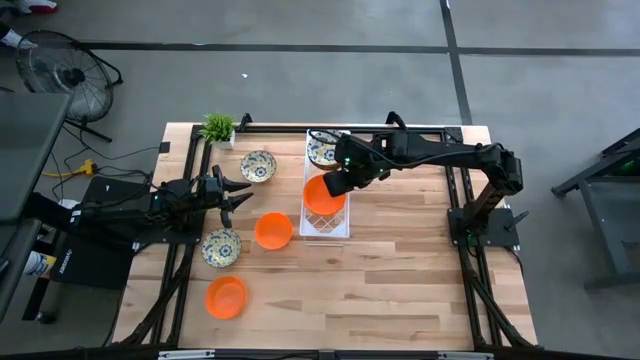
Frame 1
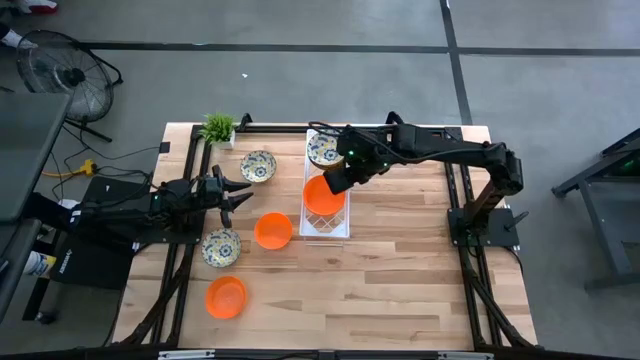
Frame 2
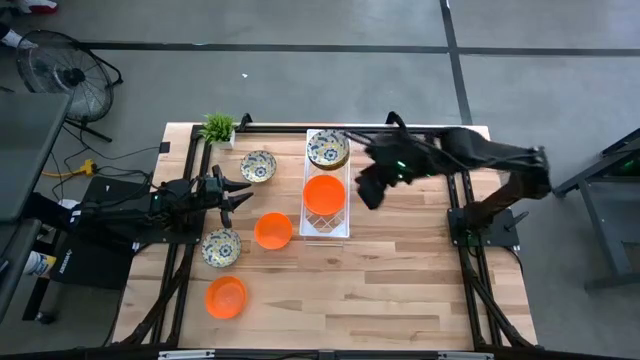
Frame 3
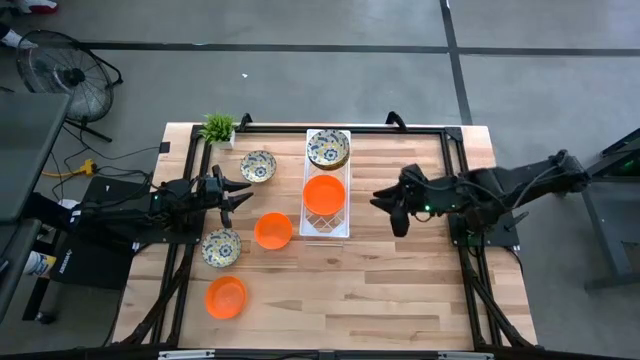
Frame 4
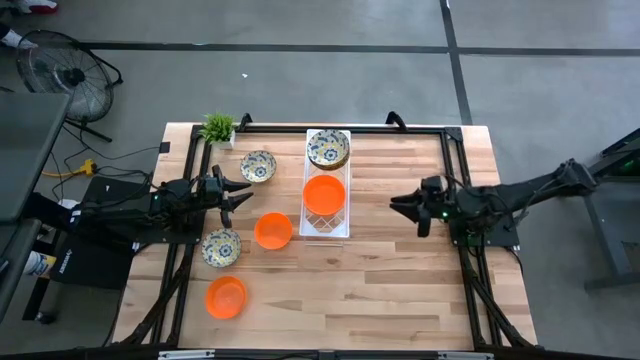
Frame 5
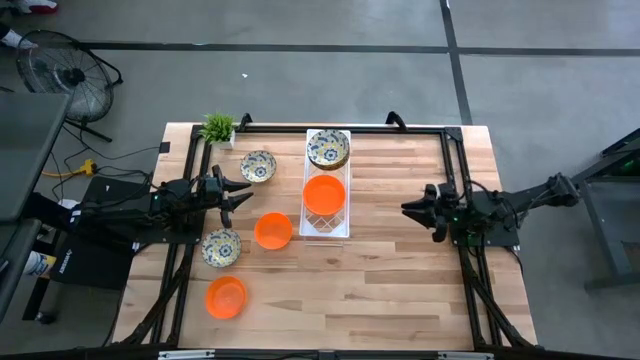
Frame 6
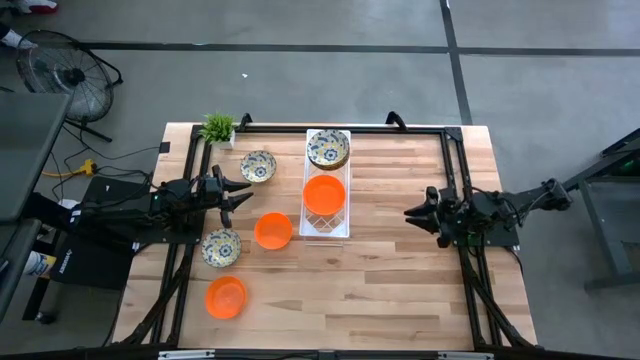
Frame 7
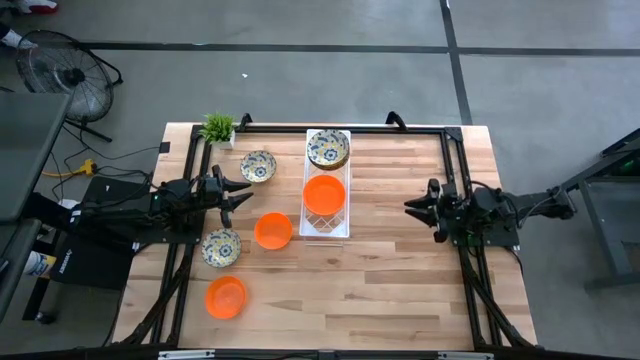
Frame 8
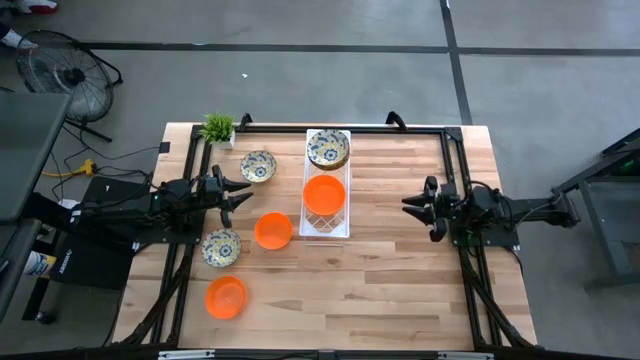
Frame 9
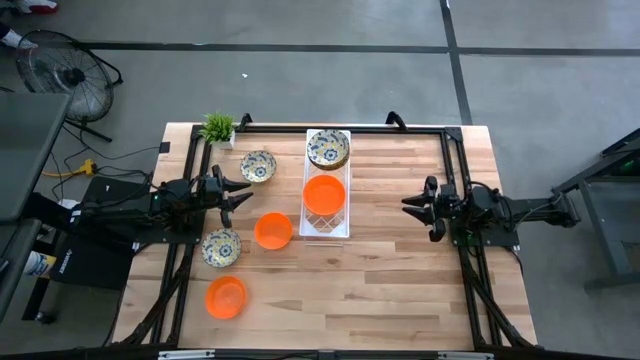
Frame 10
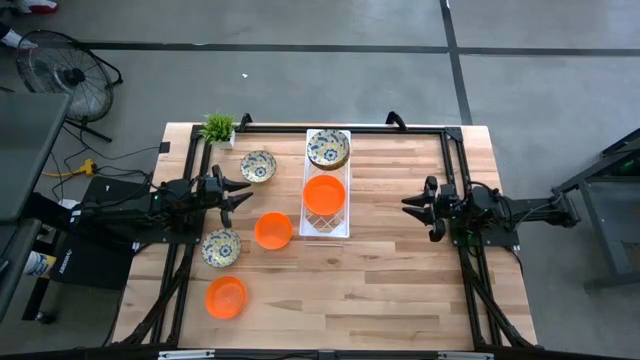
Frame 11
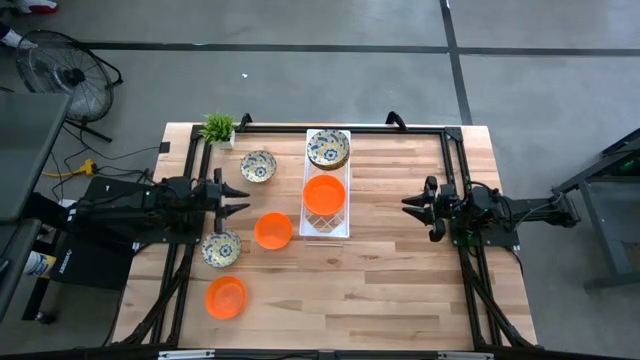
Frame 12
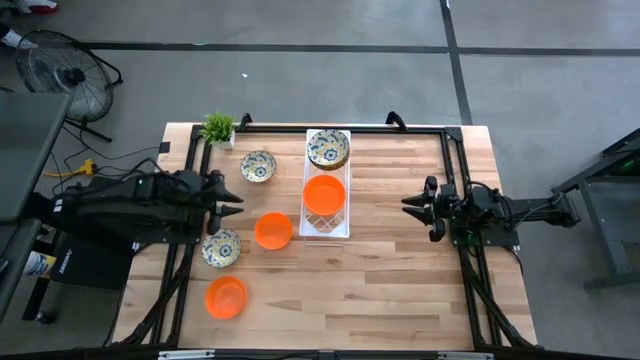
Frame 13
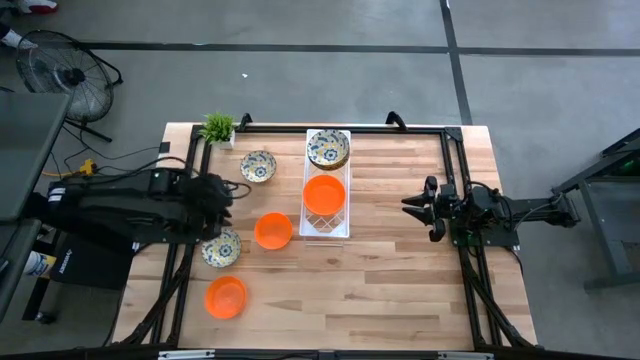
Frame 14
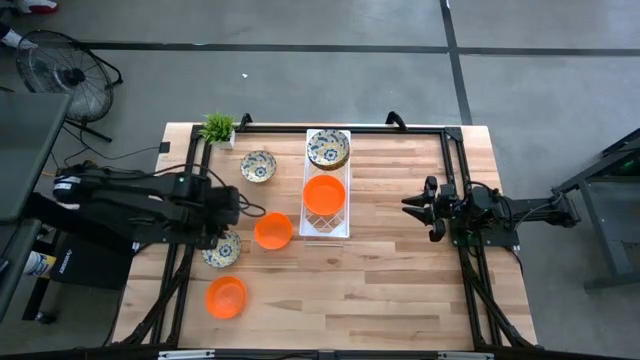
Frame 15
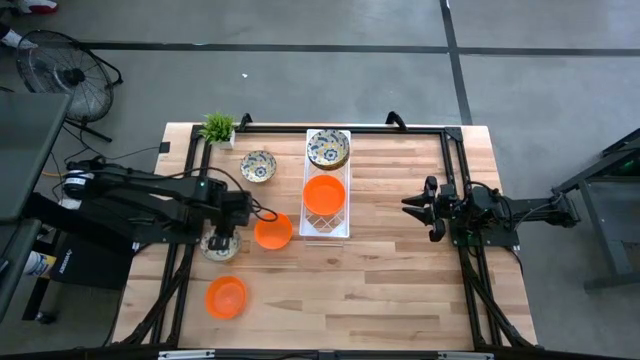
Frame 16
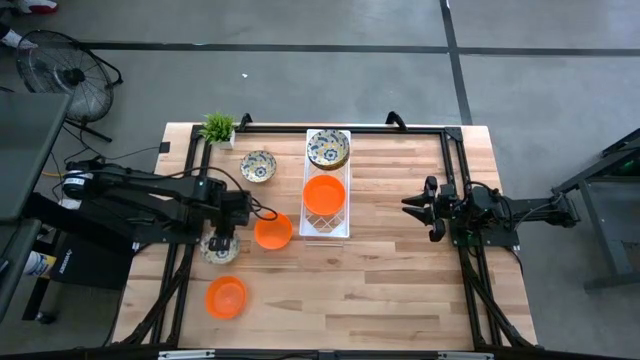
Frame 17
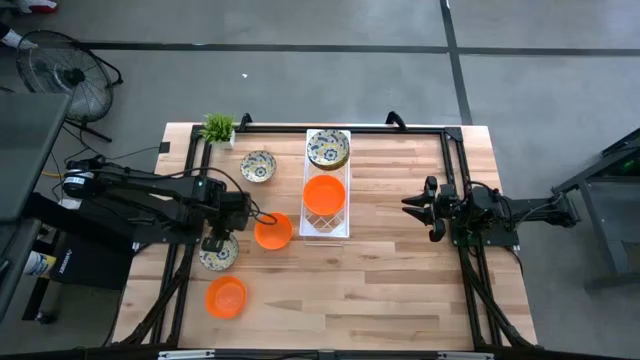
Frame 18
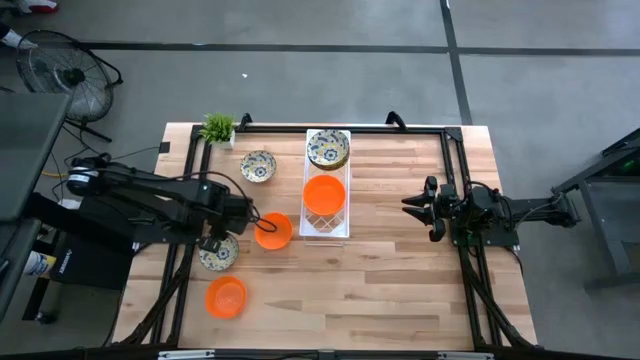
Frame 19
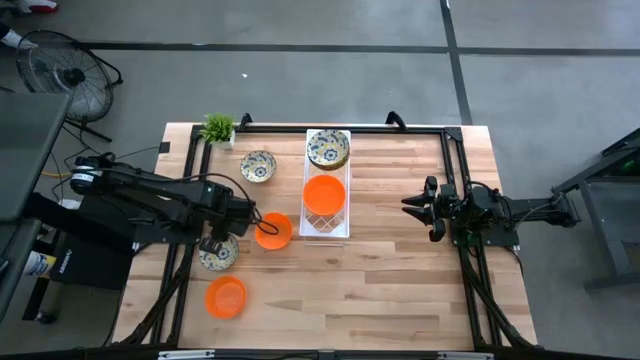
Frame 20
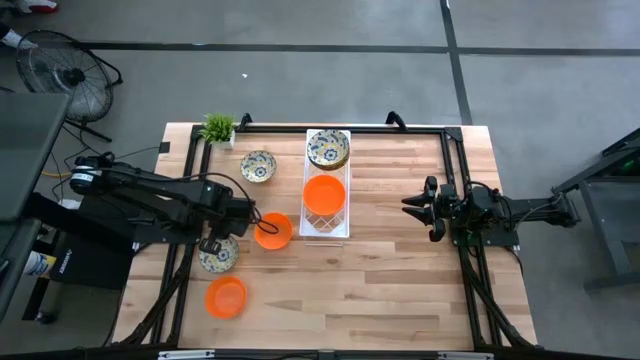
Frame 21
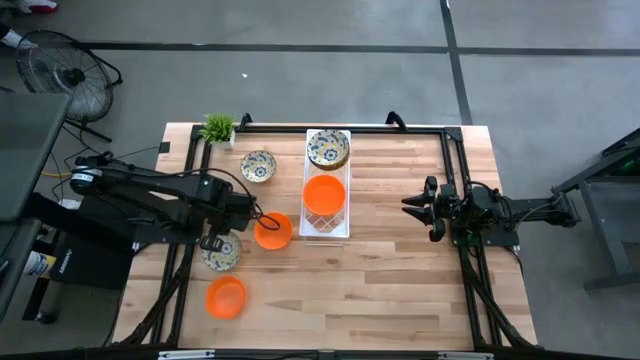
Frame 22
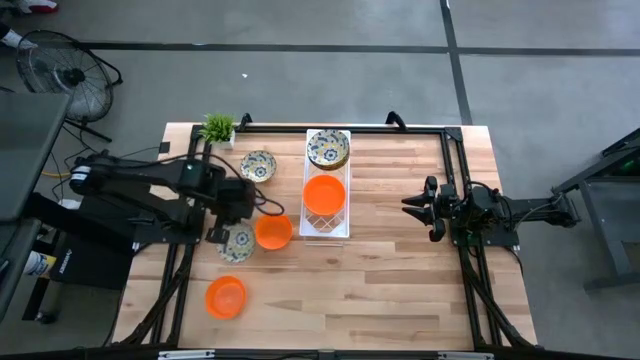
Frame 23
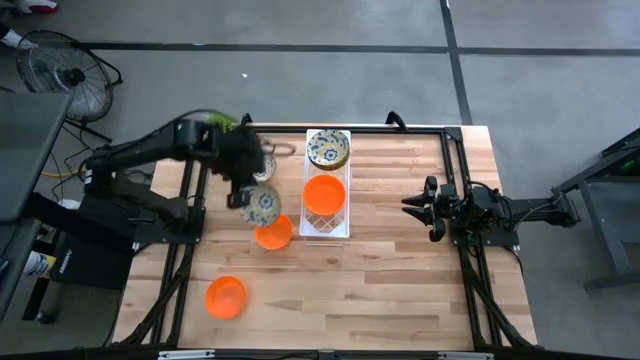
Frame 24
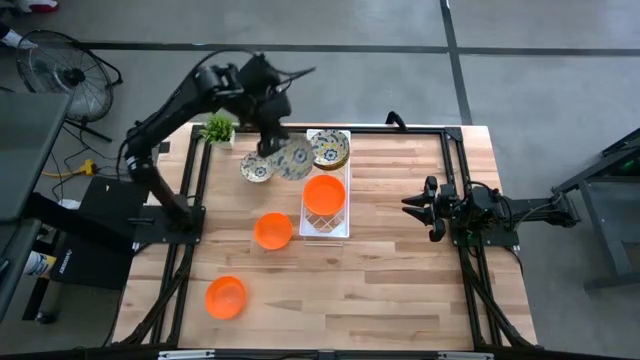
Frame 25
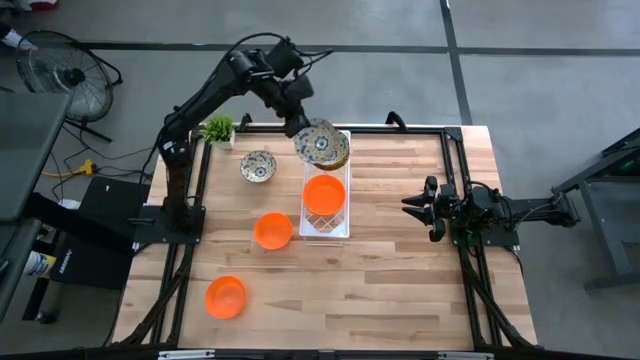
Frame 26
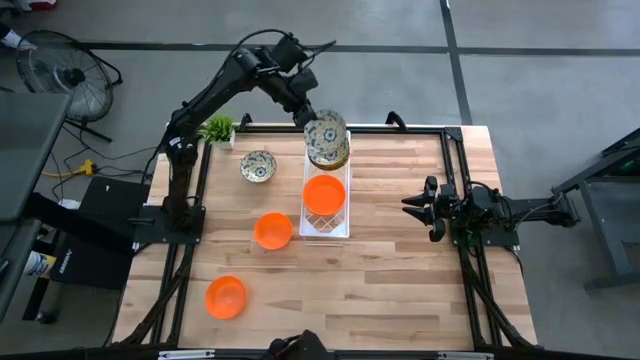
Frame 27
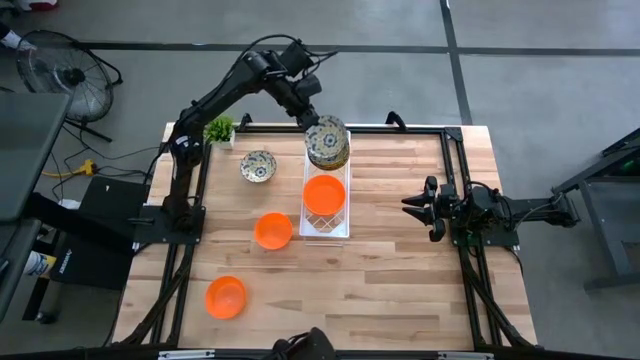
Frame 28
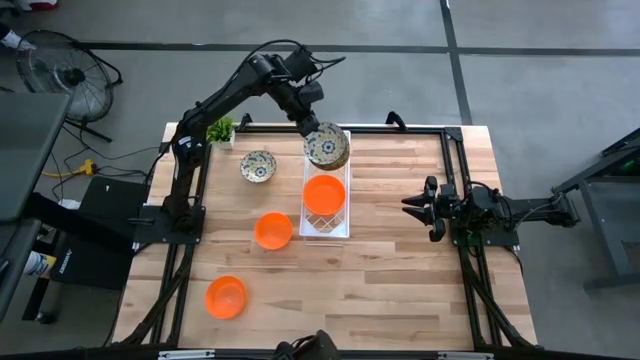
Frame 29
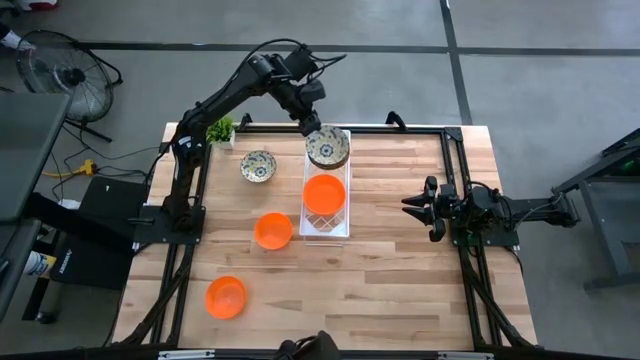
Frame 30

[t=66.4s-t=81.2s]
Task: Pick & Place Mini bowls
Stack the yellow bowl on top of the yellow bowl on the shelf

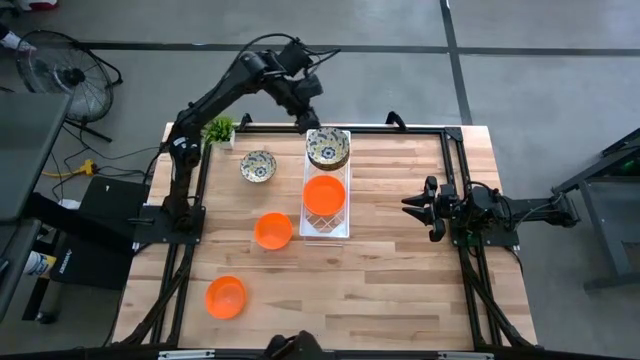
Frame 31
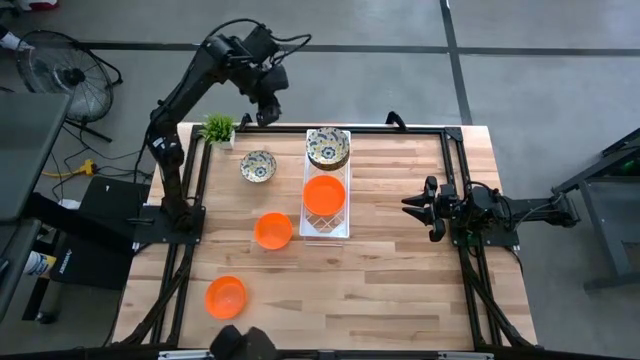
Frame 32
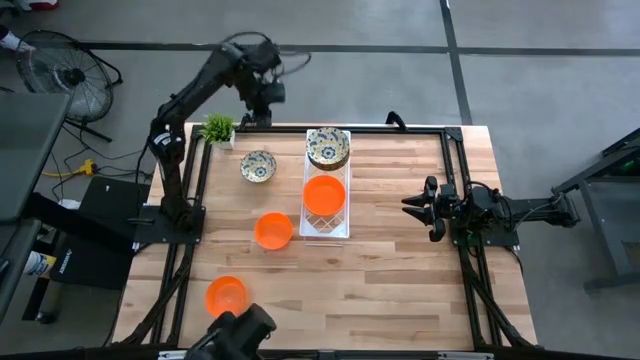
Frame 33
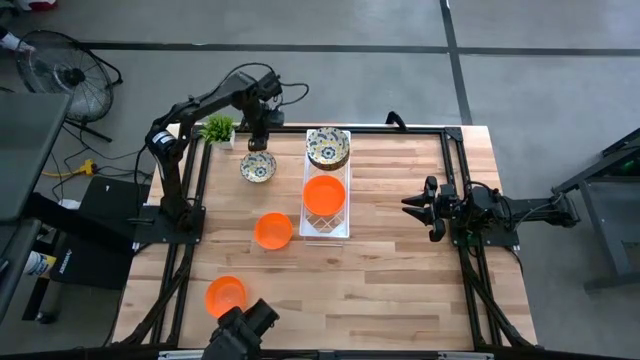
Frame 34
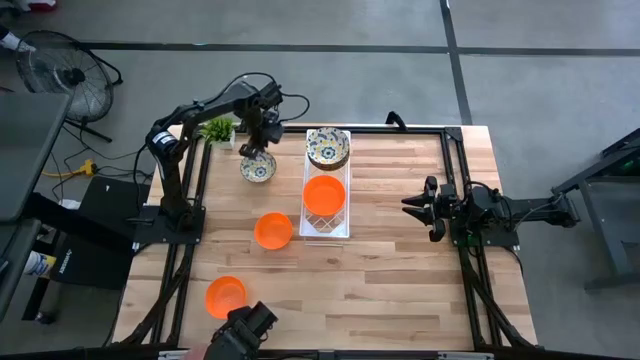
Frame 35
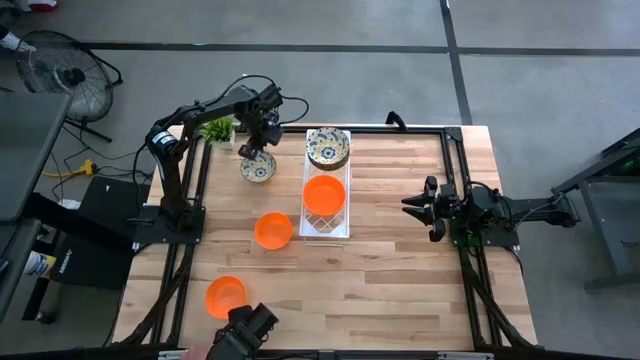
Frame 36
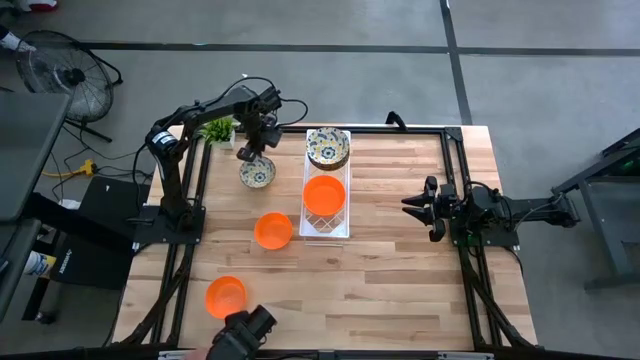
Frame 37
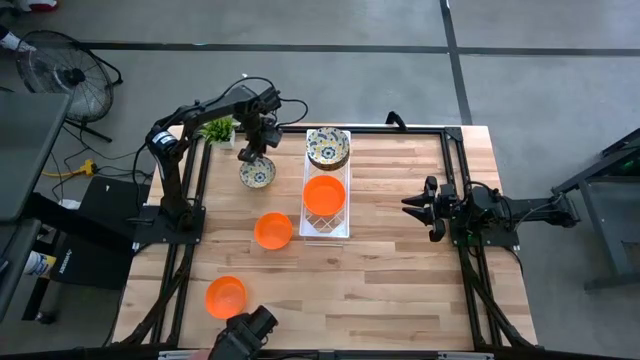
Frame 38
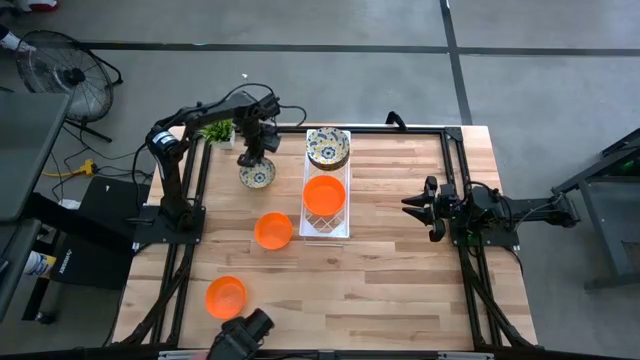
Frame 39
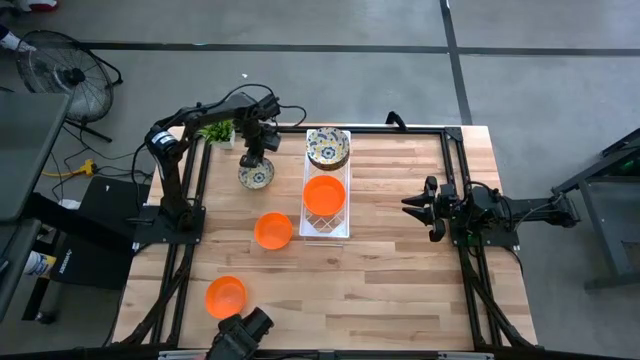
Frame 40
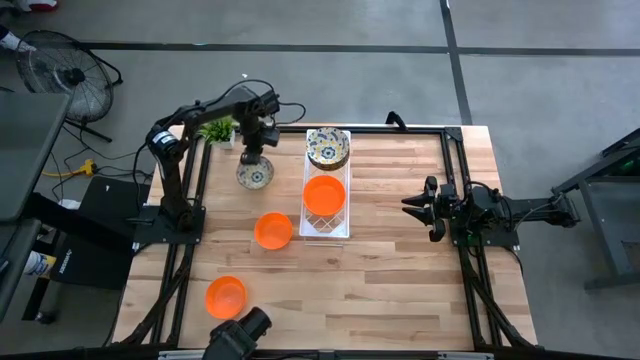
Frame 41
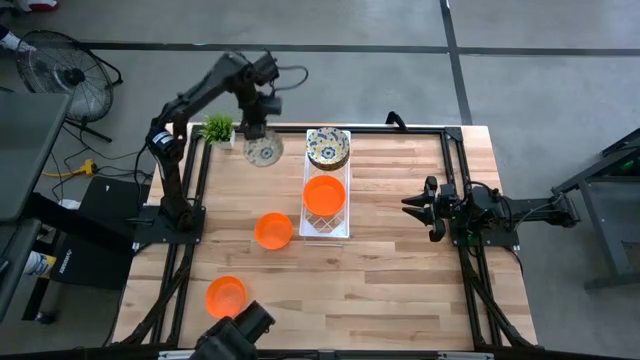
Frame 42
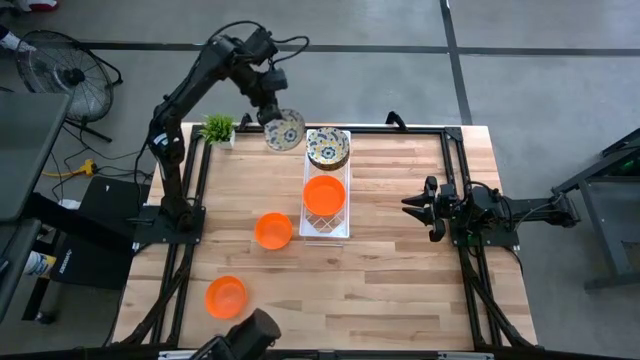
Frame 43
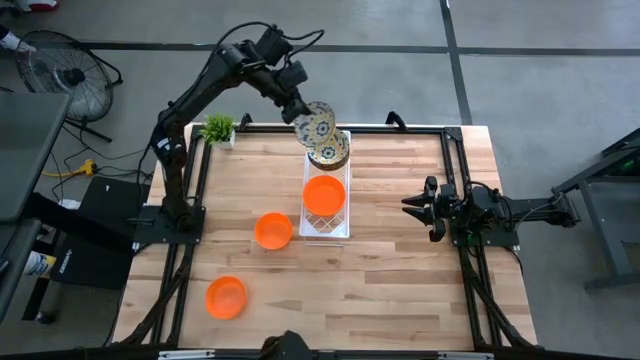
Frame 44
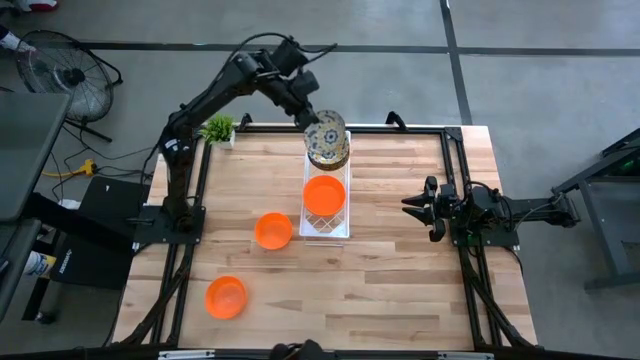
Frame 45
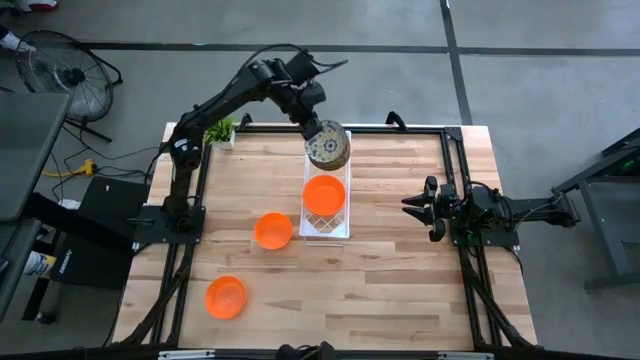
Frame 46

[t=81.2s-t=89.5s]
Stack the yellow bowl on top of the yellow bowl on the shelf
